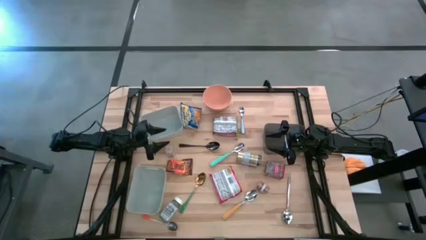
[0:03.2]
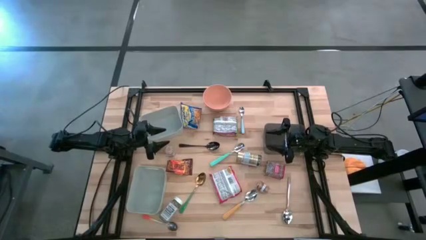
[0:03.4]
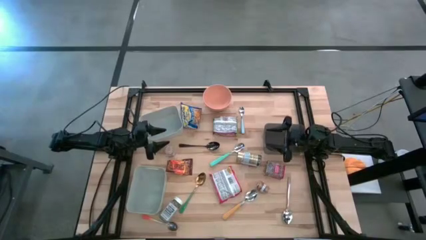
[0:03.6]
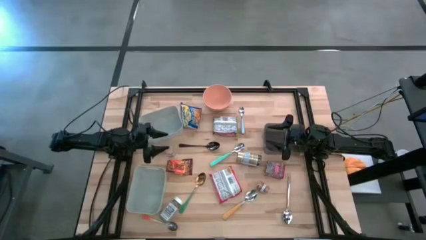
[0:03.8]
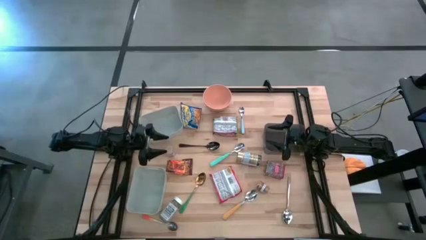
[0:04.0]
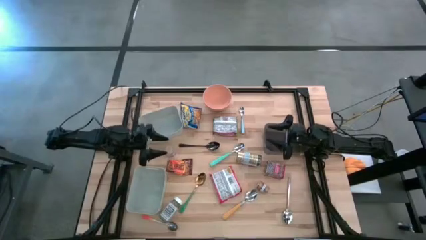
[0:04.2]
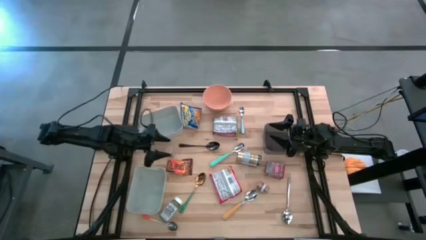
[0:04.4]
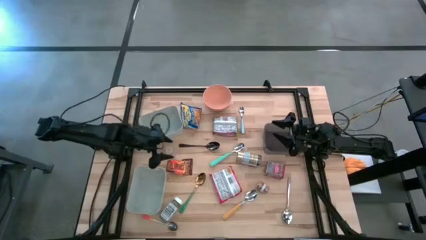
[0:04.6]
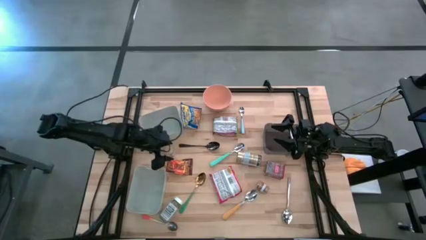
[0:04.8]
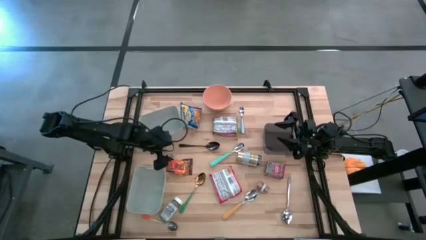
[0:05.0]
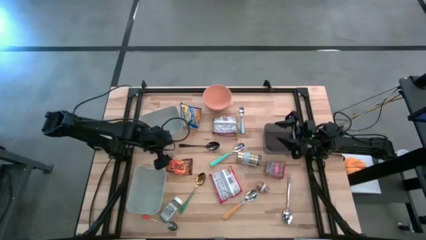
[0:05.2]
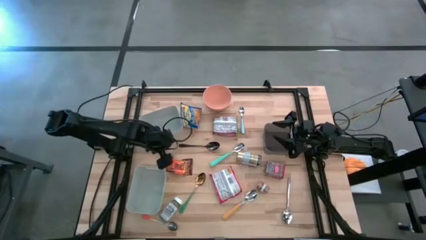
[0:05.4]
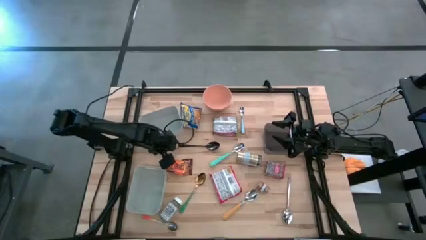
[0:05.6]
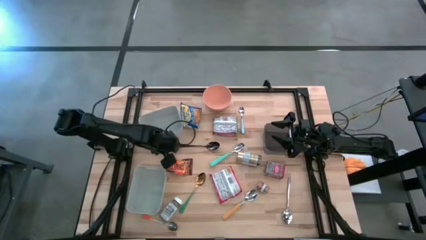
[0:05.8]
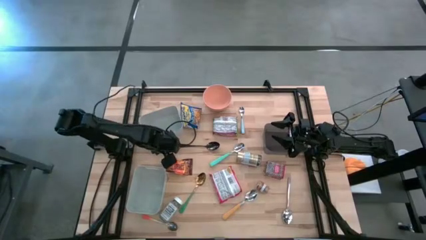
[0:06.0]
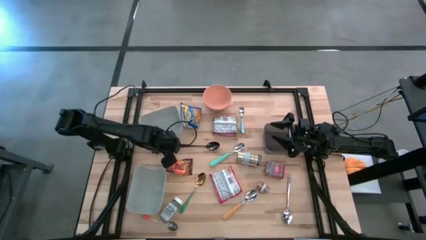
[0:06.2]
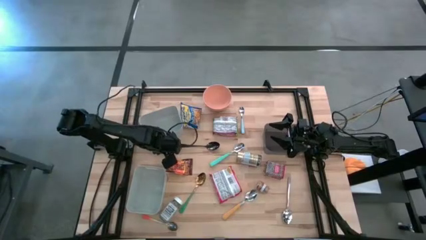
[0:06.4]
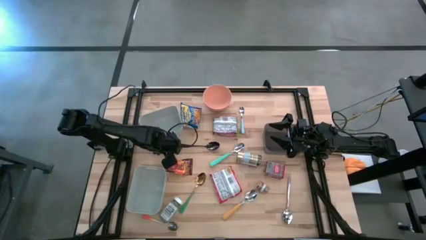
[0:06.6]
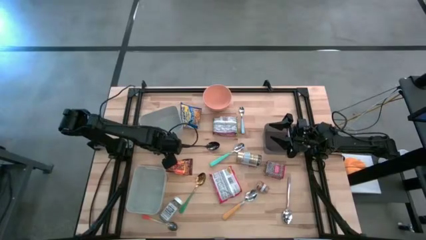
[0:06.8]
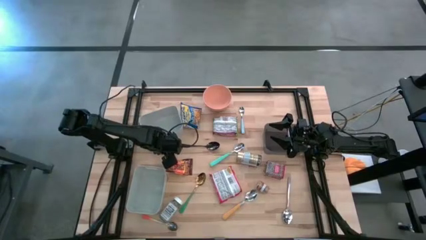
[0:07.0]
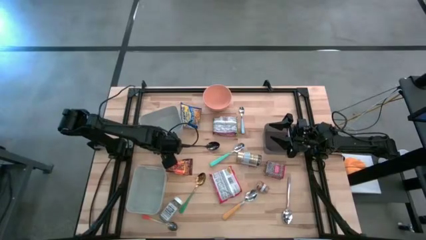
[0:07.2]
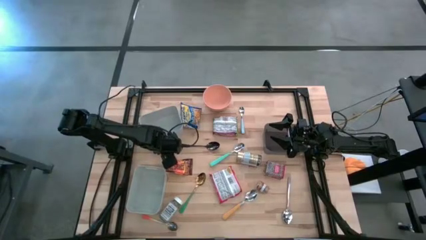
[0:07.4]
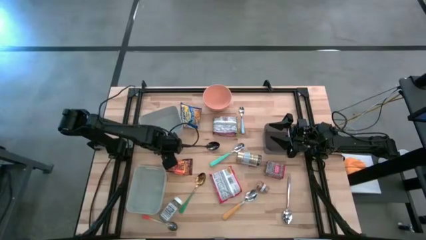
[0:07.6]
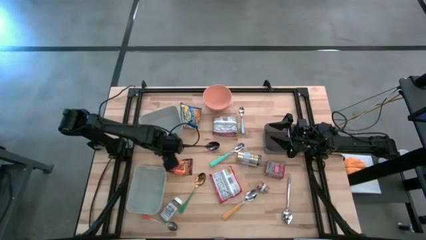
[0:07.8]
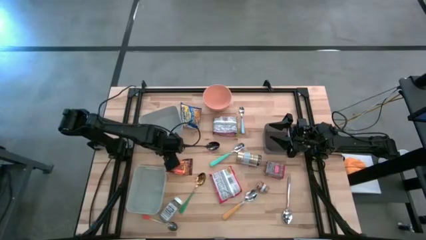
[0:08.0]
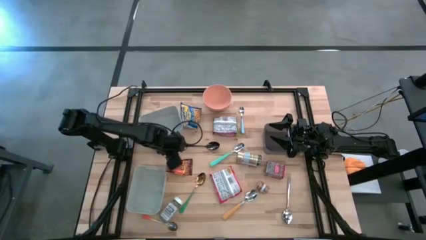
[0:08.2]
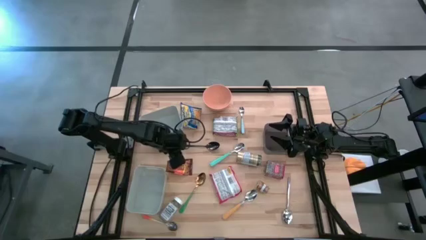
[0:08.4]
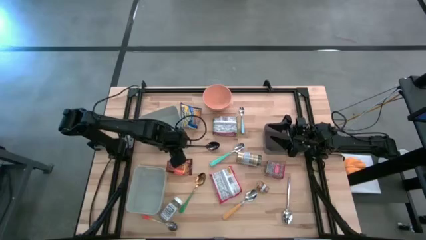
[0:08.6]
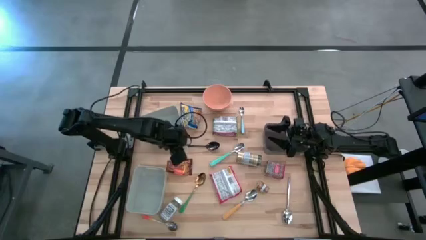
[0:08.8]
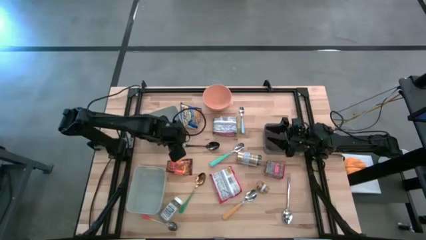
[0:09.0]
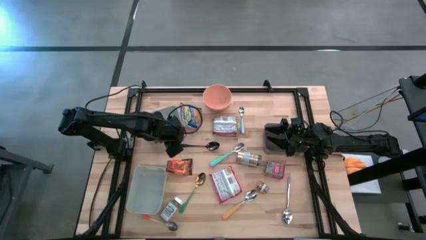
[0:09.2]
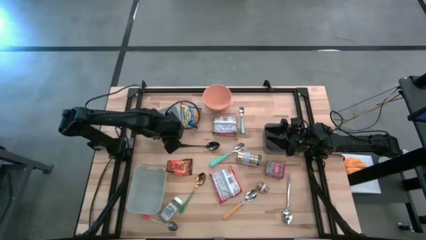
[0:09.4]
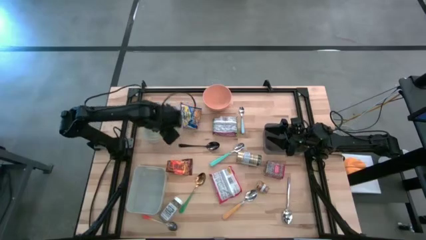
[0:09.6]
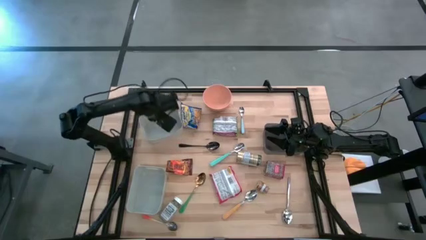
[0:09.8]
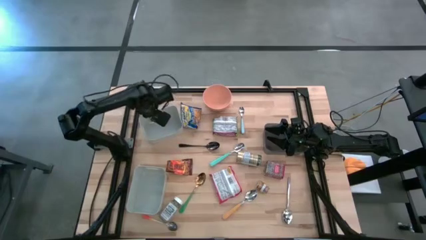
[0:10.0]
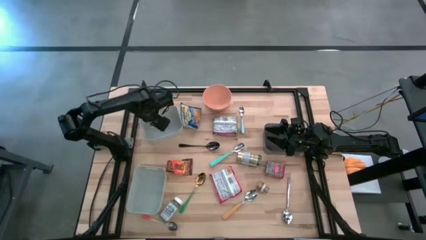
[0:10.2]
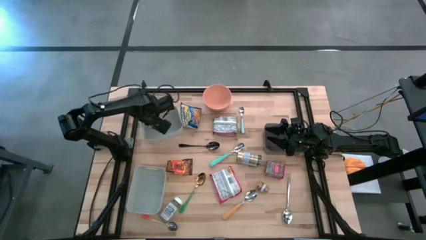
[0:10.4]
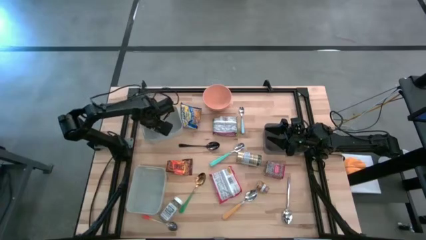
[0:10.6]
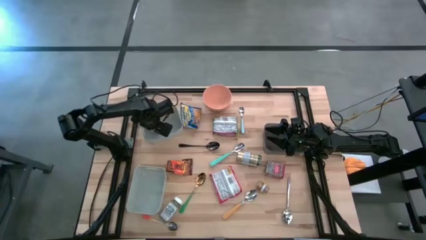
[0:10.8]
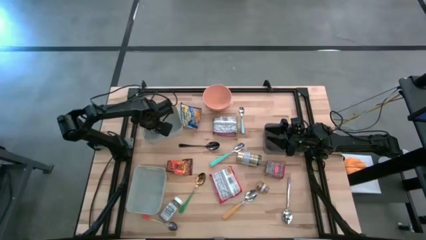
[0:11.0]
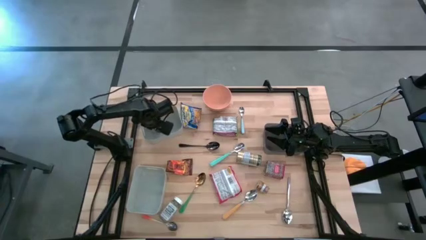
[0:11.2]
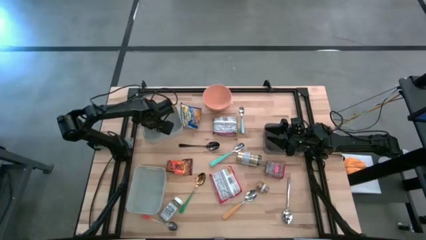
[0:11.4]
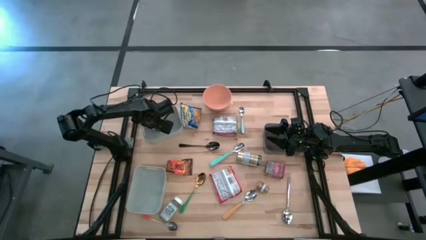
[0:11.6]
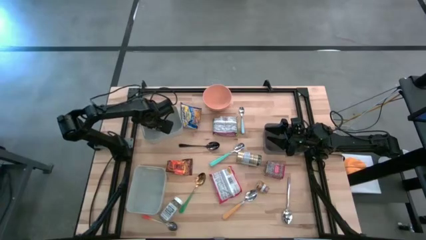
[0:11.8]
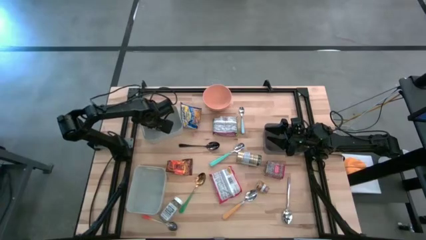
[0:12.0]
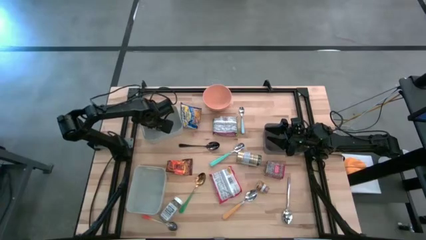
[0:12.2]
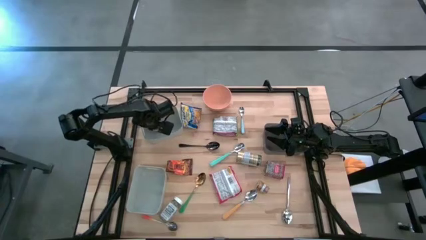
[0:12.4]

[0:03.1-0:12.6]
Put the left brown seasoning bottle into the top gray bin

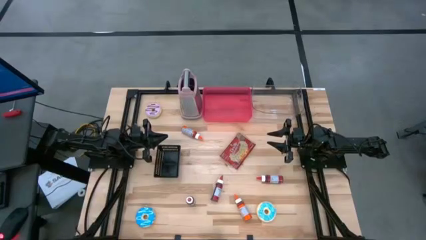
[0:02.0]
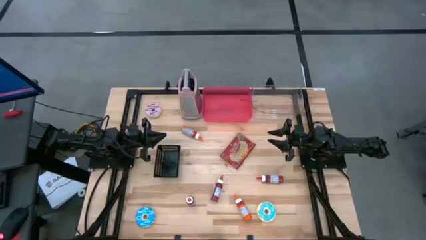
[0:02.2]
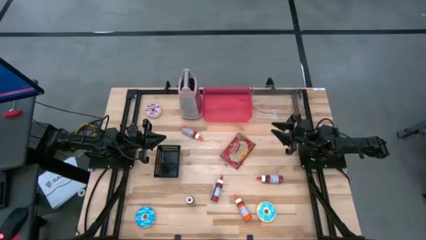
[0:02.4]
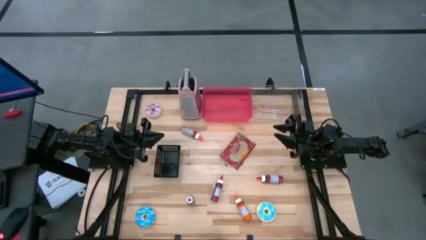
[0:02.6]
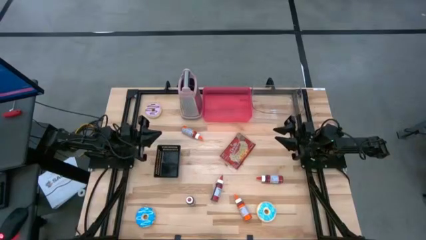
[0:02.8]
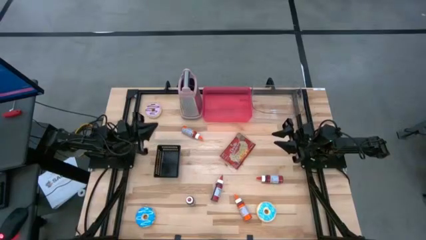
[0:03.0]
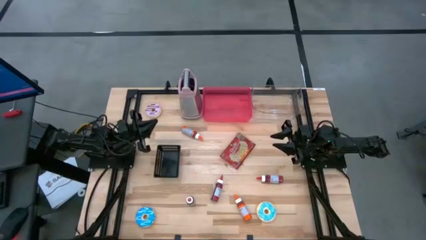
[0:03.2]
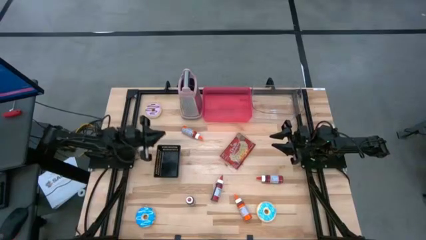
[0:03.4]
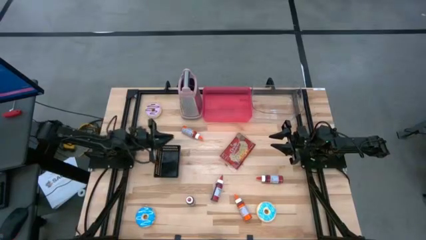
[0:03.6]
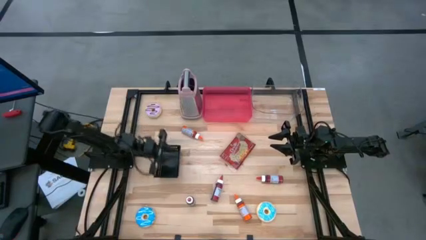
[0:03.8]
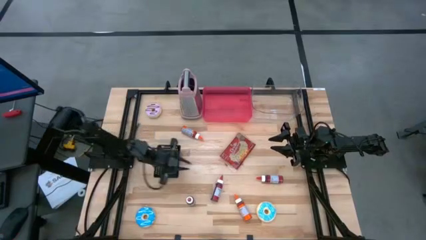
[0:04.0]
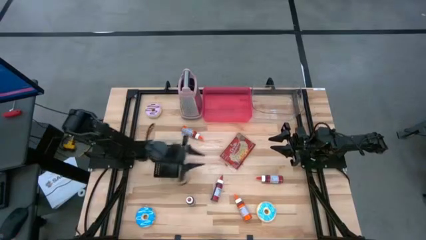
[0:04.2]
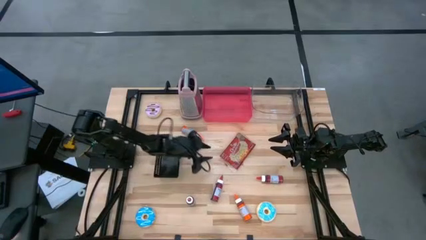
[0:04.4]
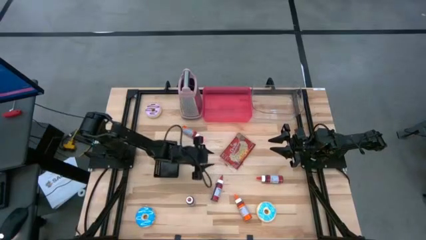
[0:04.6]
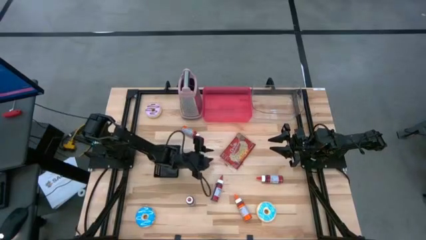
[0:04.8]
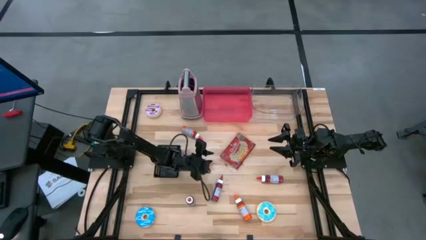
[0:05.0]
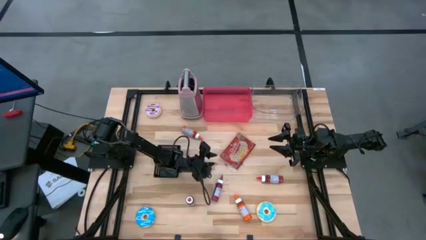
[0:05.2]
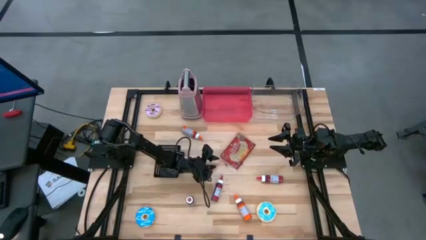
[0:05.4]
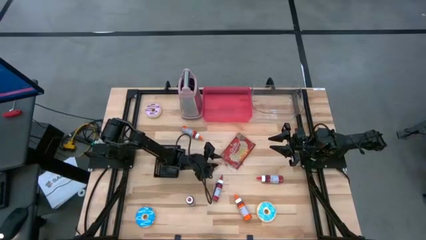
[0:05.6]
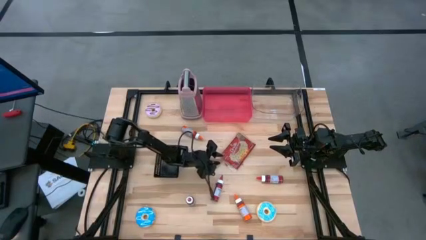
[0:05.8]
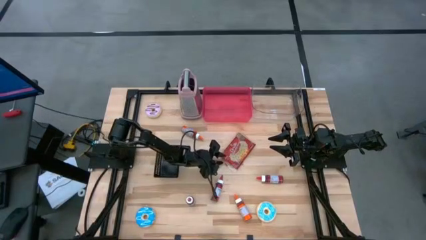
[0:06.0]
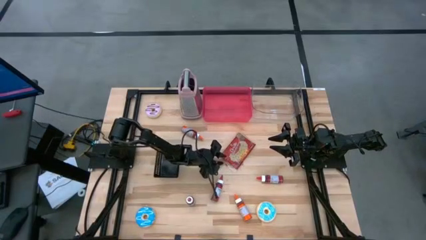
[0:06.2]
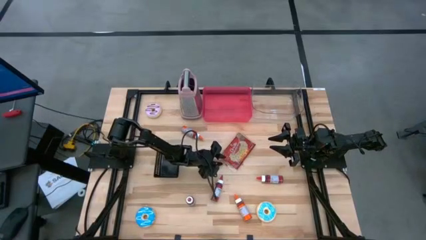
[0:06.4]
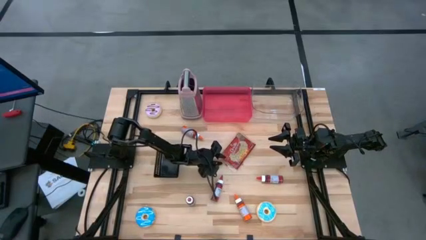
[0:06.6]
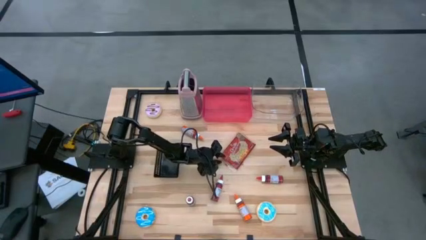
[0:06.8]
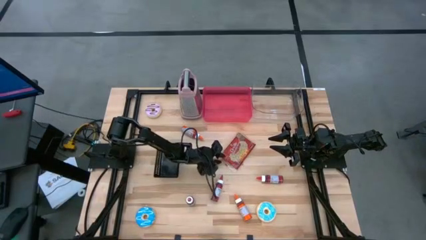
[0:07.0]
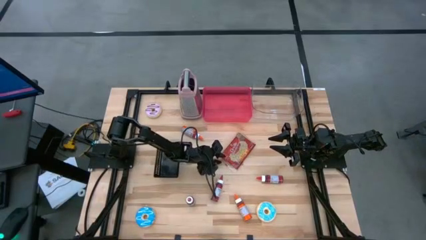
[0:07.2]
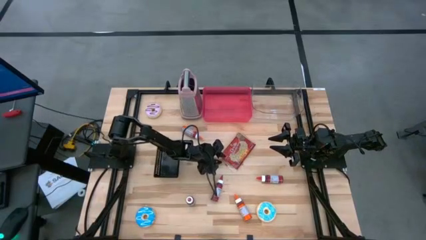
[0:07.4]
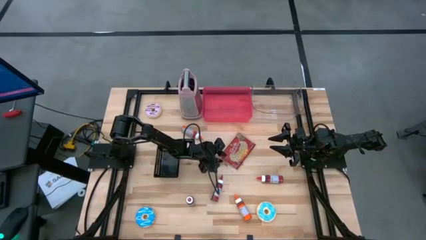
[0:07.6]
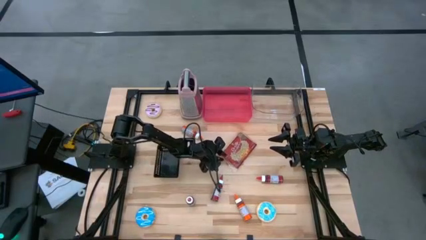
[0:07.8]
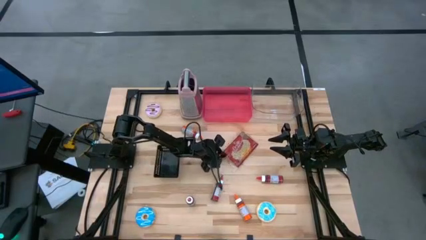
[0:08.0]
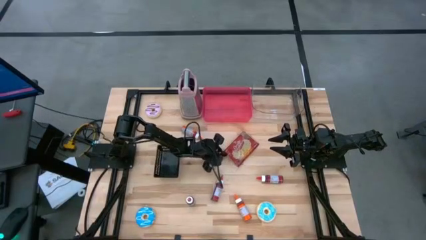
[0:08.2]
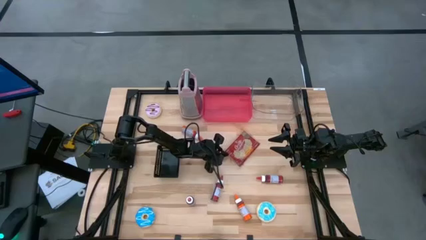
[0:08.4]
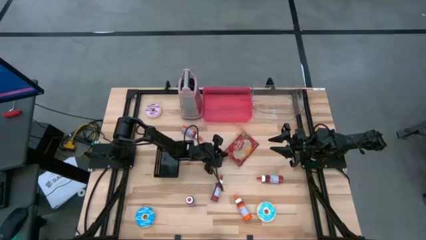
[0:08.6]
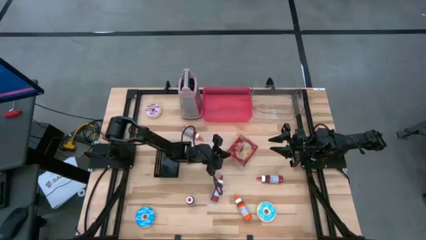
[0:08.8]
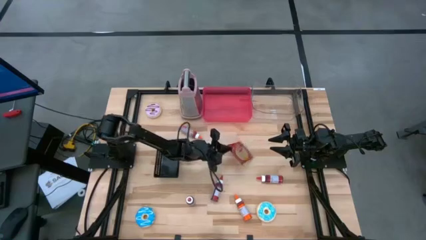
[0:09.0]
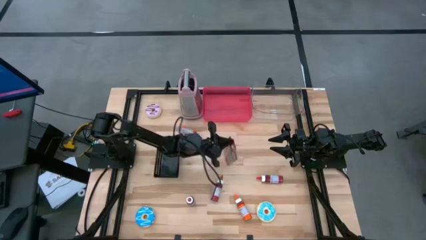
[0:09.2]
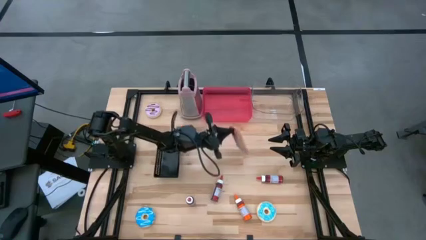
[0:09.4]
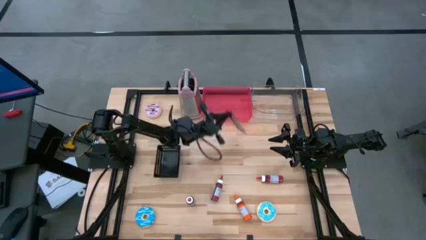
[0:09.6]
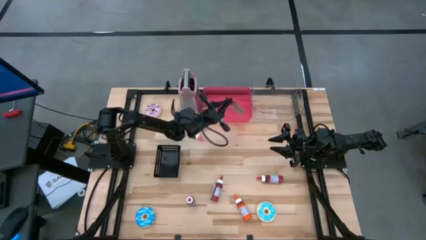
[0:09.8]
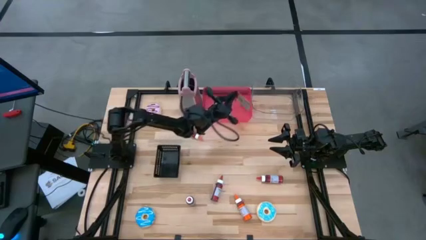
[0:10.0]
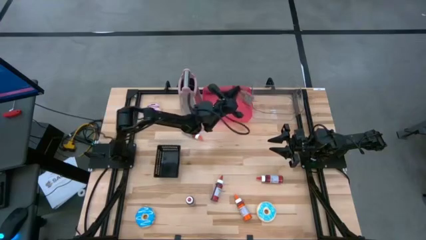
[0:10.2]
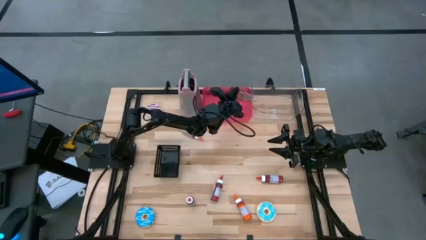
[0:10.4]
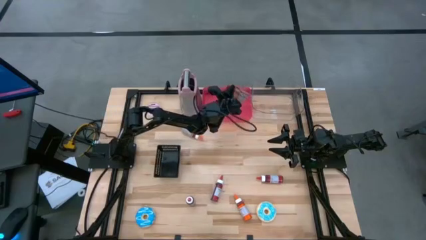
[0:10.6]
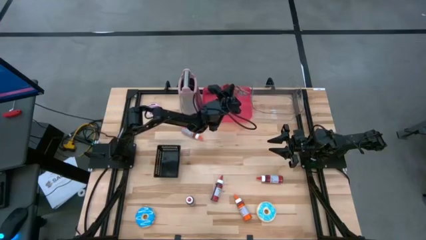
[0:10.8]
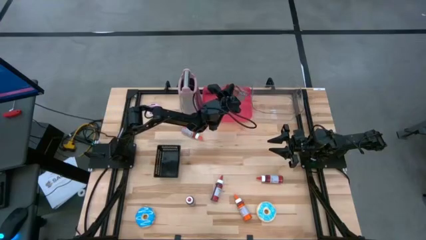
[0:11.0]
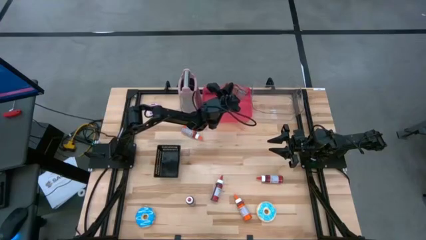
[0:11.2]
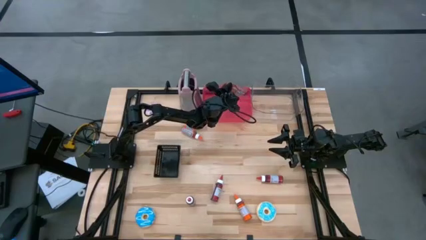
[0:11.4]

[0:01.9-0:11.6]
Put the red popcorn bag into the pink bin
